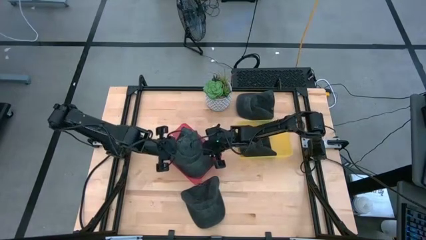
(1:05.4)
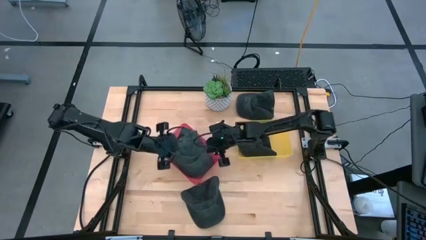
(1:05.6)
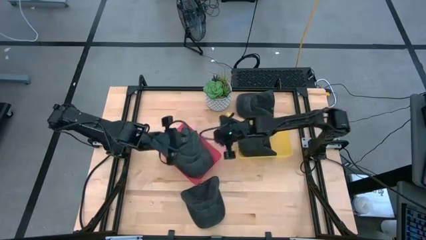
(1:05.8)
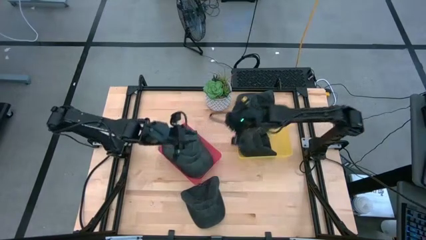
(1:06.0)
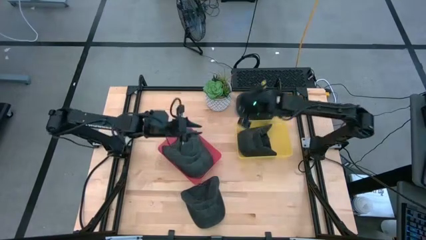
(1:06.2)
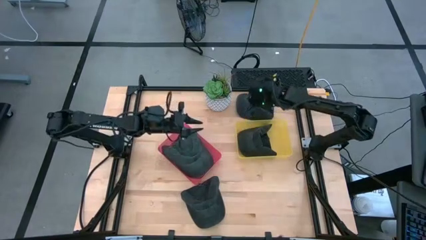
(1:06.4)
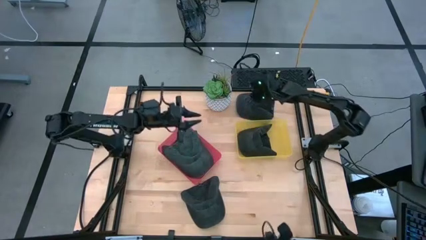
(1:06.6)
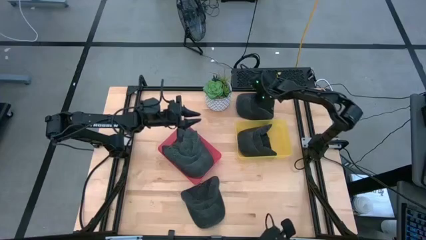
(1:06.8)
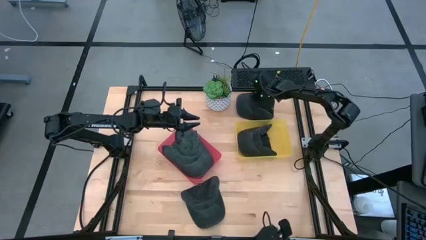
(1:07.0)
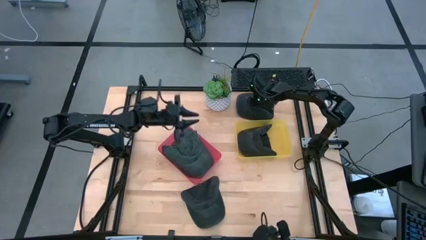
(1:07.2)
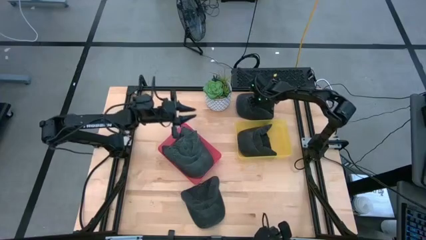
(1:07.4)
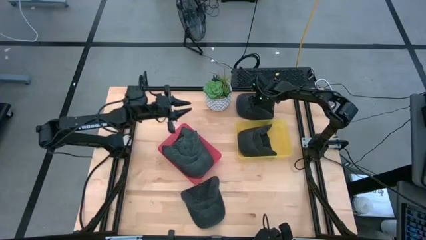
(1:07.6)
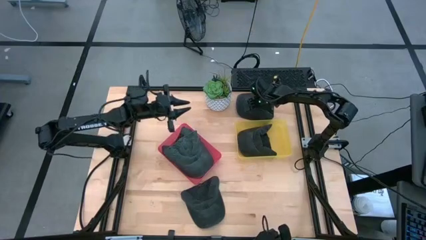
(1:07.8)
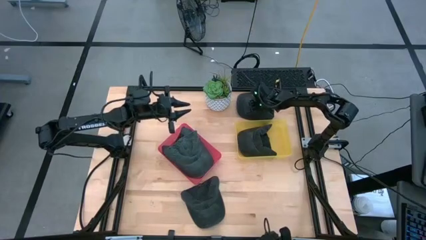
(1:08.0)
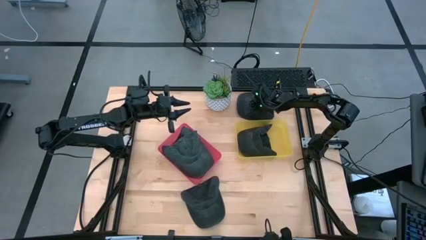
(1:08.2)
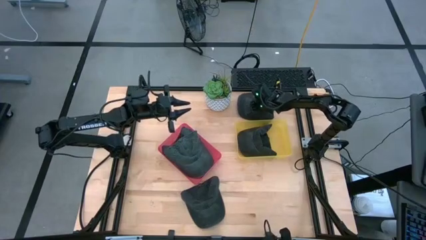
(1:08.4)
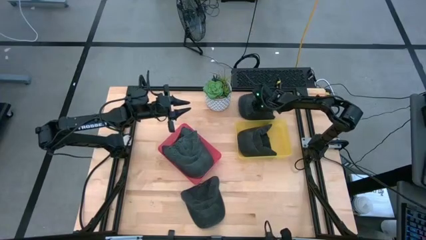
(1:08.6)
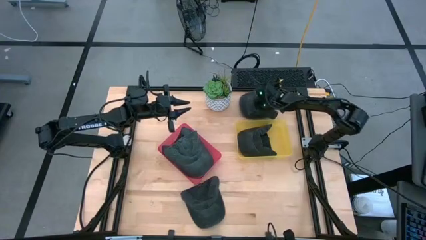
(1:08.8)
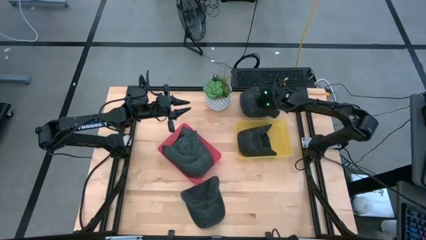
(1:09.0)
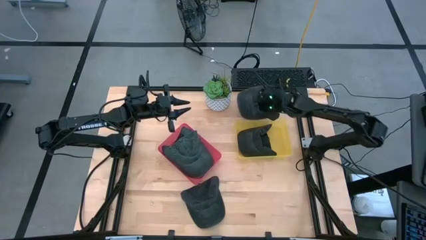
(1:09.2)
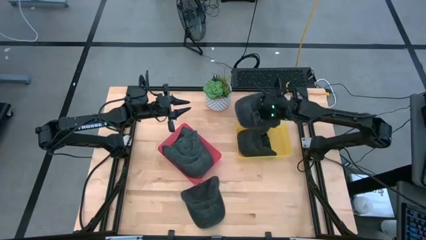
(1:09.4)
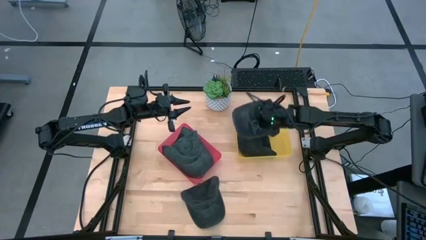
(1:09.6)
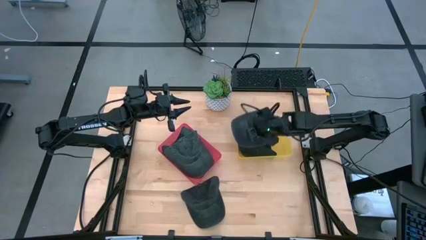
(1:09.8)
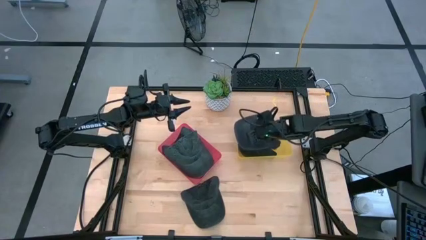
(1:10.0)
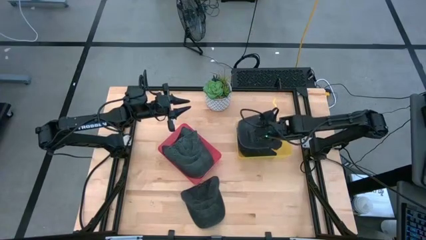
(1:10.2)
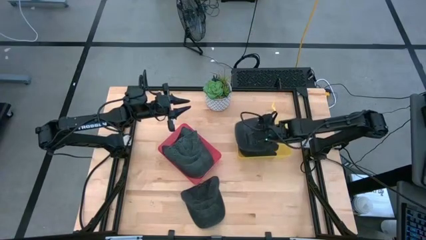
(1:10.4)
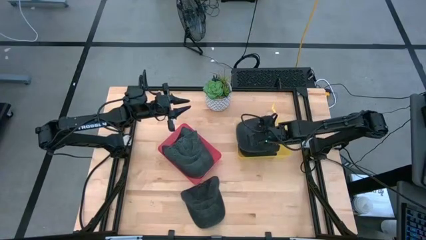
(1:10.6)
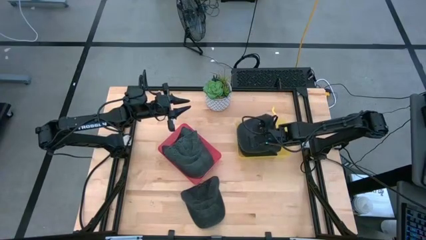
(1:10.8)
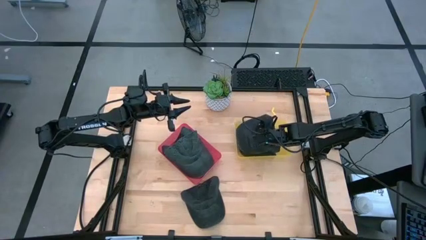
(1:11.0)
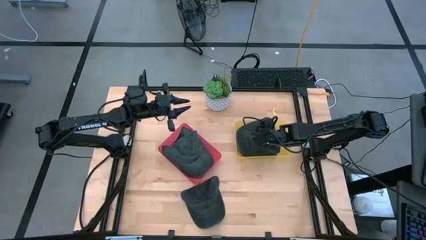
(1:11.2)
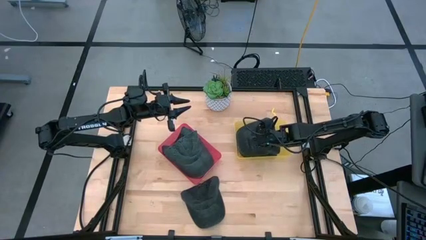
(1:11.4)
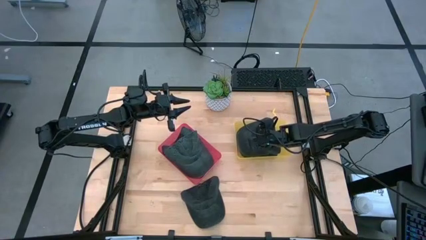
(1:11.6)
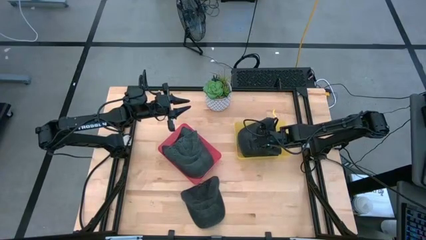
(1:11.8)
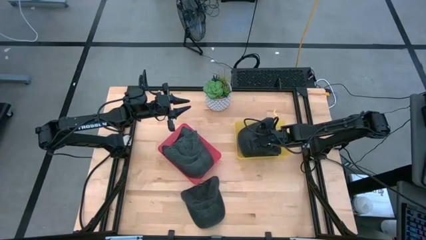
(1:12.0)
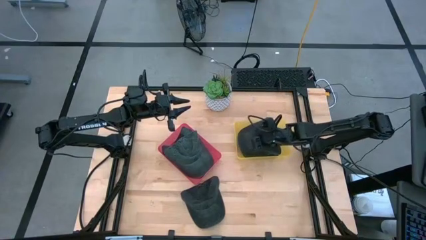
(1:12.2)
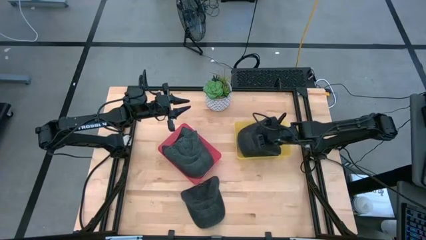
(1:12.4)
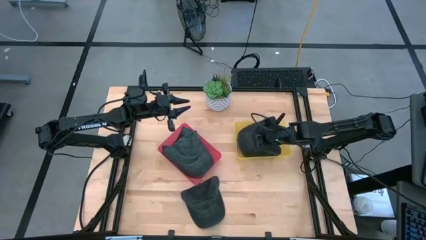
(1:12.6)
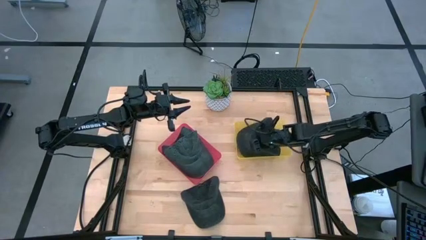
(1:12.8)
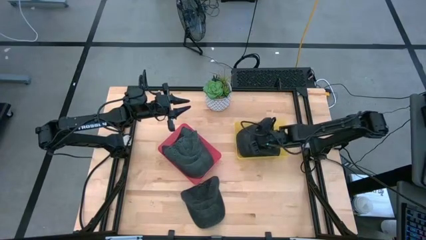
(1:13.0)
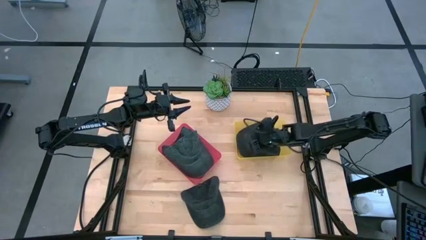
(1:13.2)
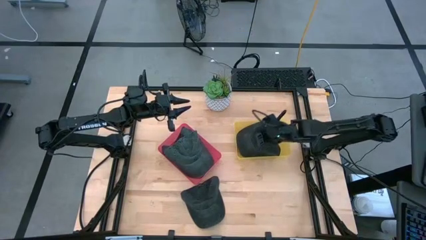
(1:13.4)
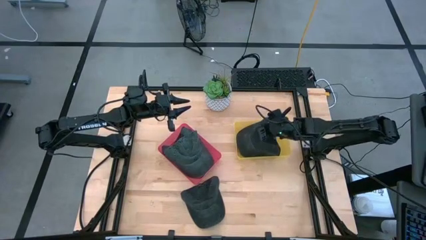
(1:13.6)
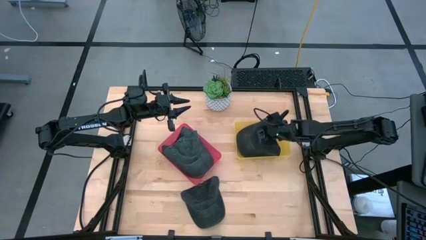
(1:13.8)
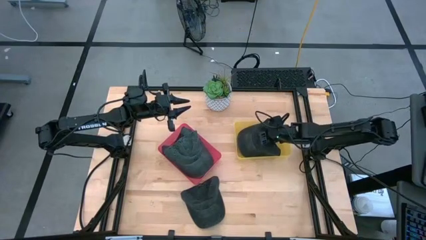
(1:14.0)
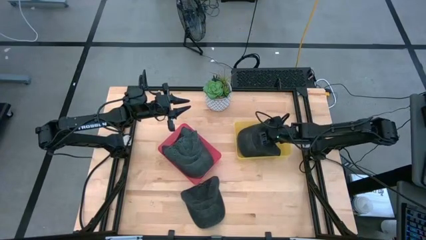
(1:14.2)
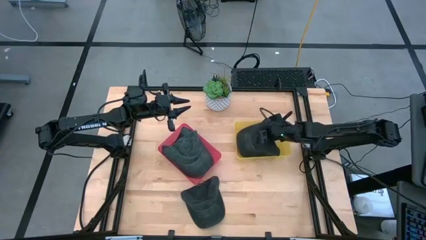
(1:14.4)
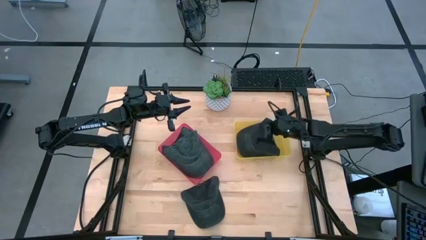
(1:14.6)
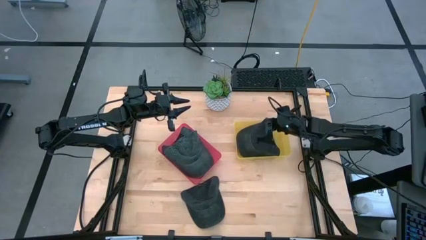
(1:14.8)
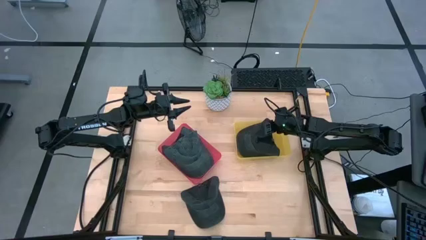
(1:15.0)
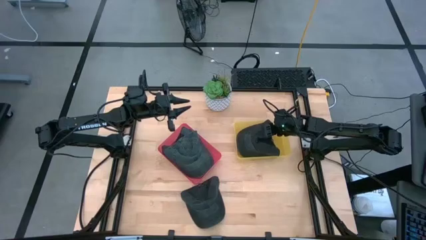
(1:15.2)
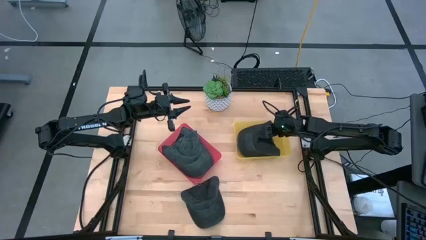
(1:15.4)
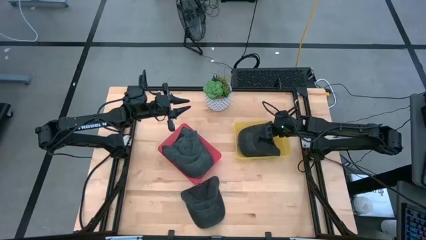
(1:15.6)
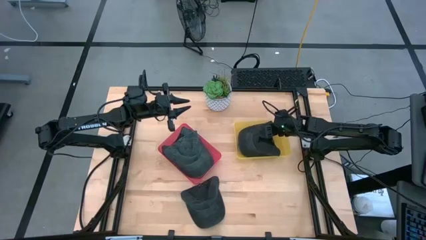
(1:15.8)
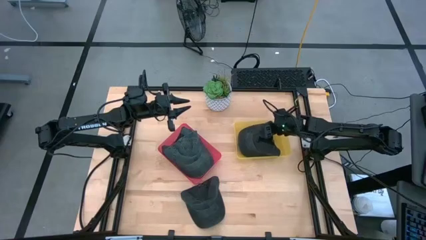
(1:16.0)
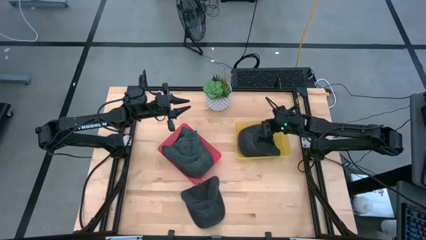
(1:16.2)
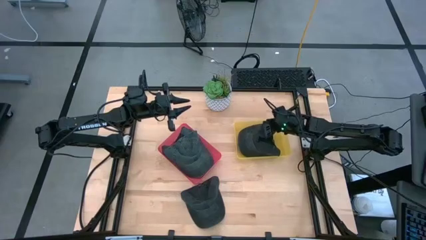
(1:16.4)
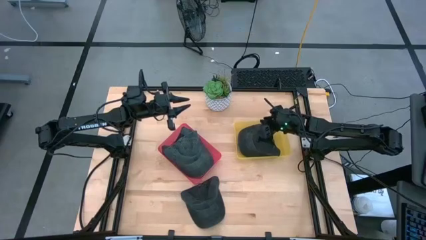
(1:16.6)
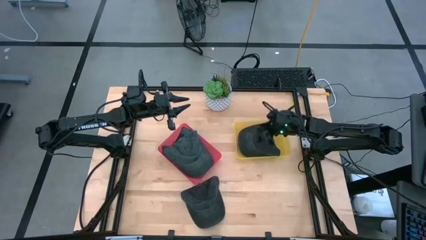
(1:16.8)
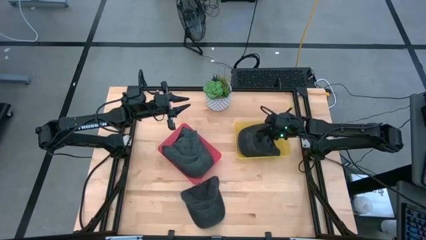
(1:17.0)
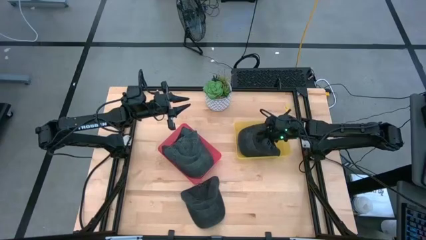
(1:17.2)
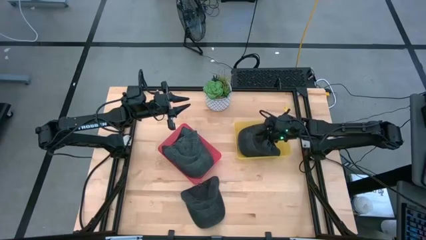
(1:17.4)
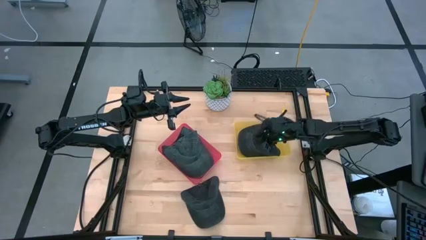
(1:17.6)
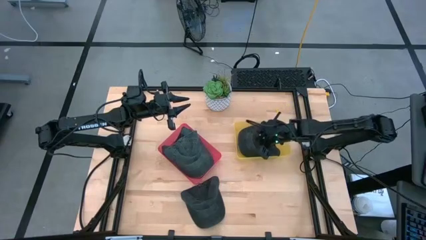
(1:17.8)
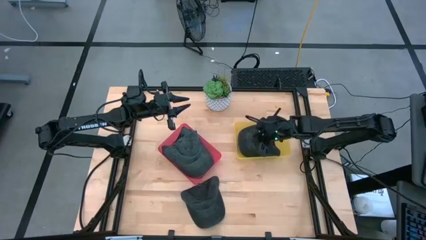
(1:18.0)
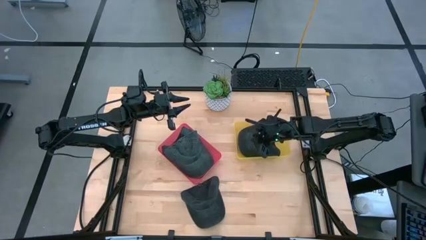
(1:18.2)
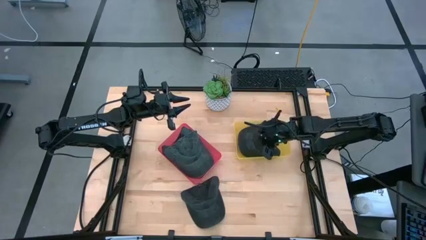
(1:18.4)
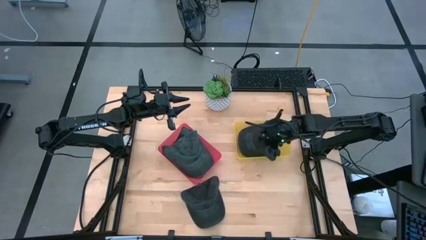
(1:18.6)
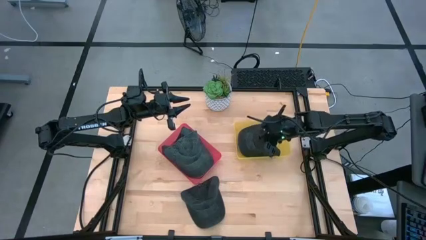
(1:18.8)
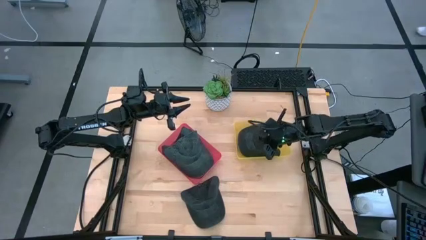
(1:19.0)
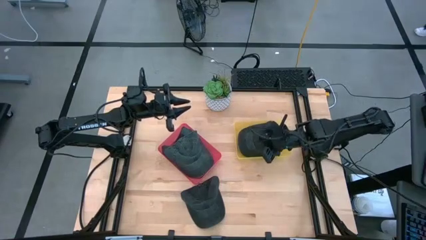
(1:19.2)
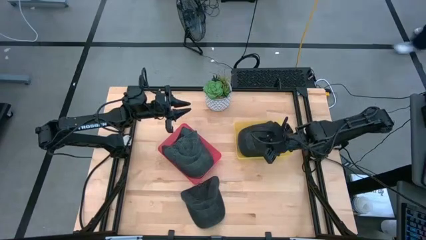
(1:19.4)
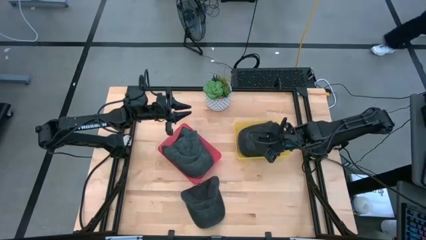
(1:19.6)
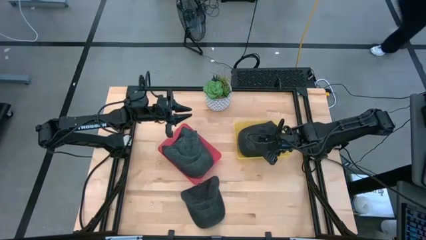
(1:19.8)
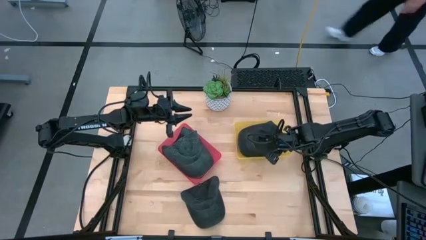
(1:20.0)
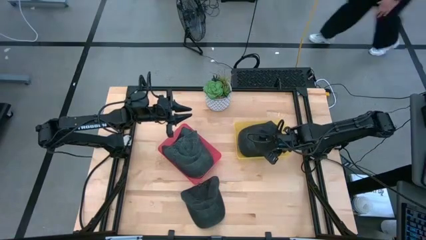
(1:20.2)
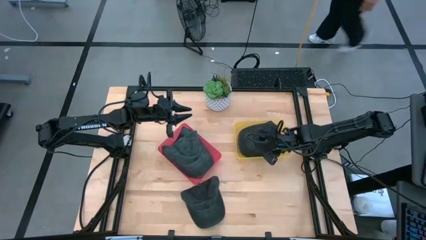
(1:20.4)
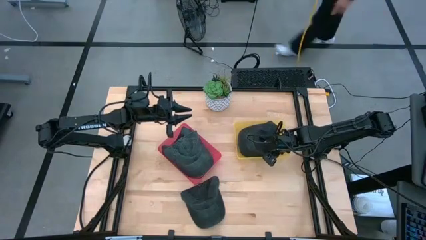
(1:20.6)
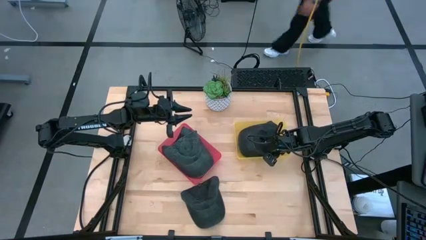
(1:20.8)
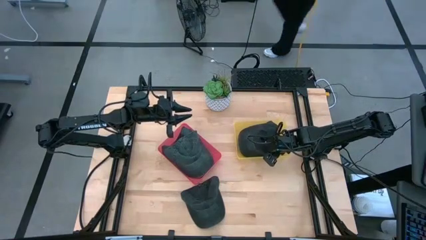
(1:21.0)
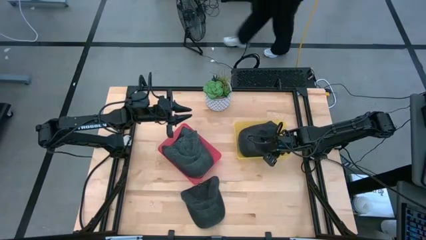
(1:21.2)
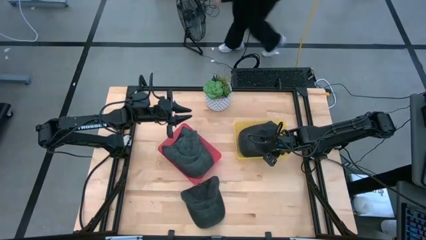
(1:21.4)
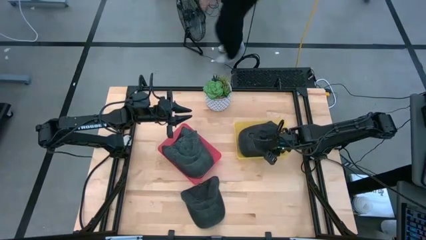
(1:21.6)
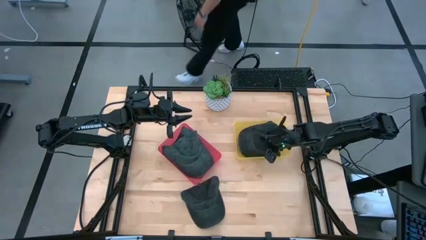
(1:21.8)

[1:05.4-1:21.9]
Task: Pick & Place hat
Put the top black cap into the yellow bin

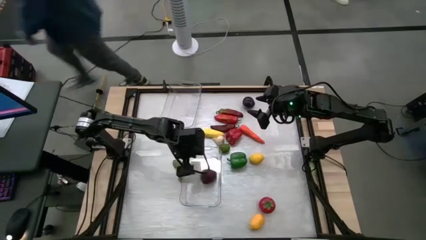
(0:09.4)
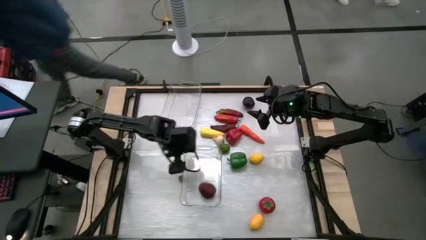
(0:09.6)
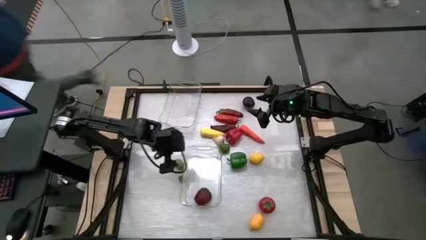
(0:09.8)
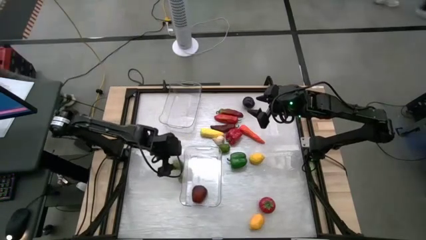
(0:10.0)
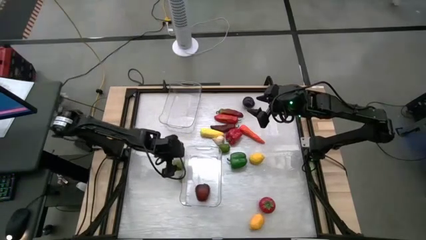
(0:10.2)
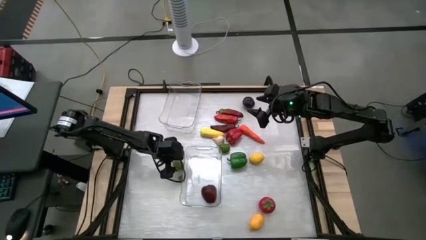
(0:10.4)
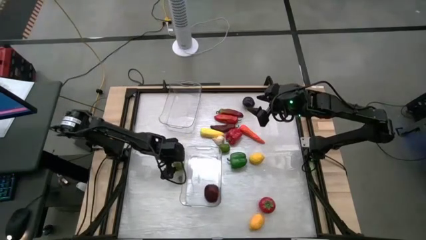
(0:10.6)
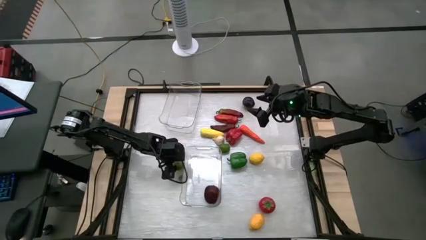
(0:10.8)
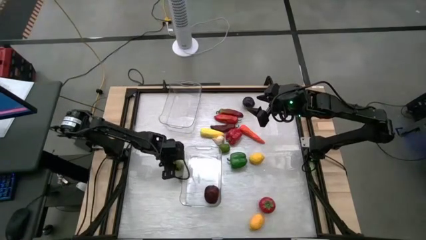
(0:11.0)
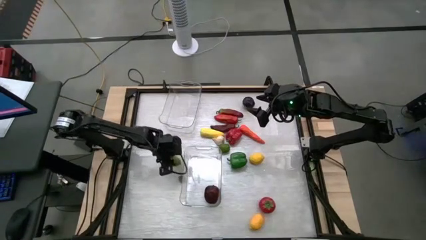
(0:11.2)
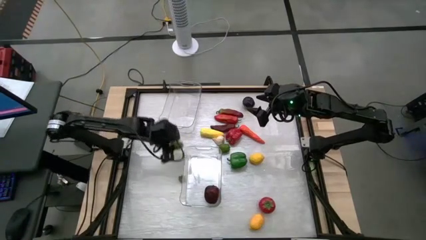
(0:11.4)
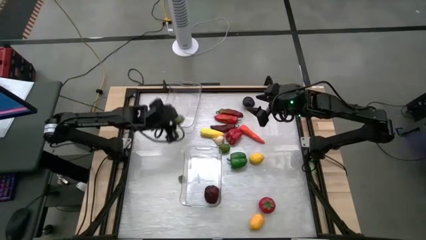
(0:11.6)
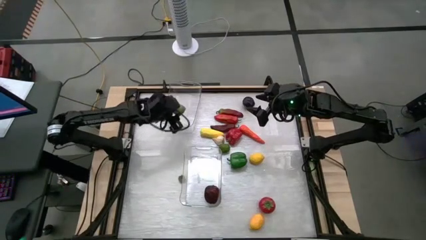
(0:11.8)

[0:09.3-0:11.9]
Task: Sort produce into baskets
Put the left green lime into the top transparent bin
